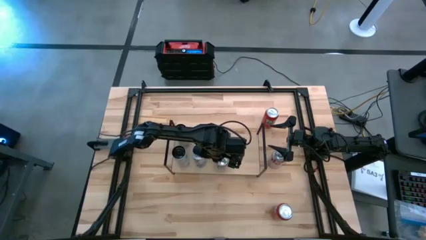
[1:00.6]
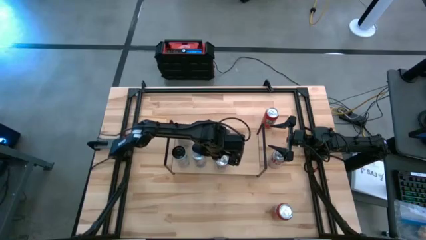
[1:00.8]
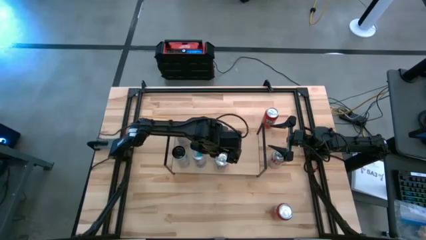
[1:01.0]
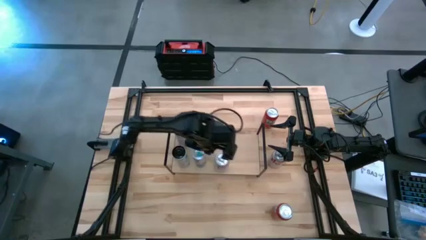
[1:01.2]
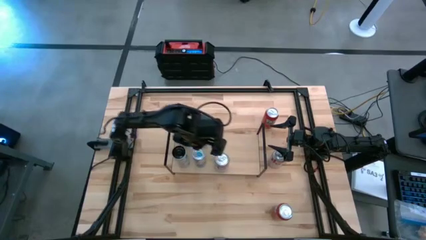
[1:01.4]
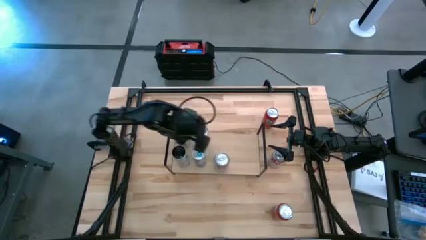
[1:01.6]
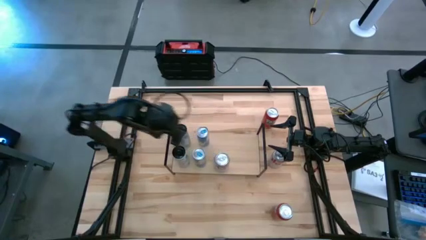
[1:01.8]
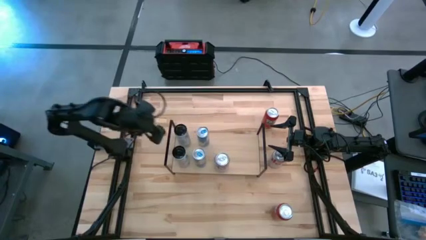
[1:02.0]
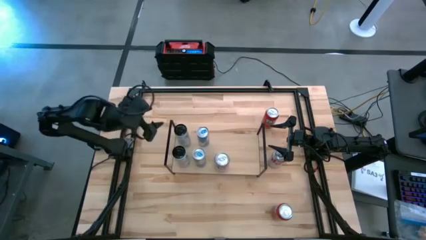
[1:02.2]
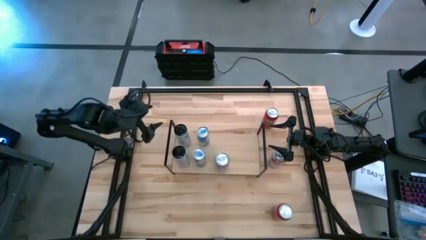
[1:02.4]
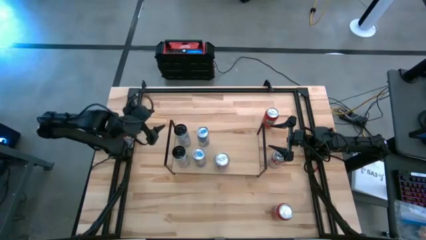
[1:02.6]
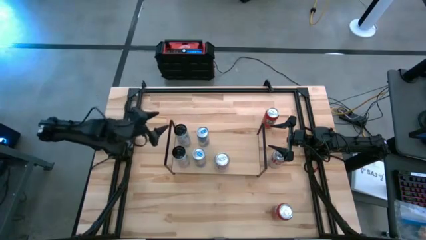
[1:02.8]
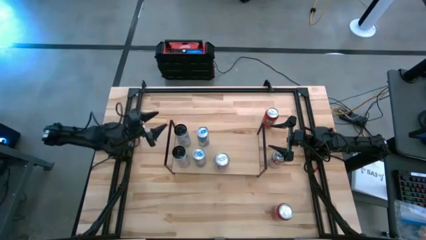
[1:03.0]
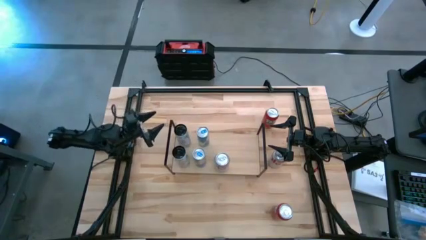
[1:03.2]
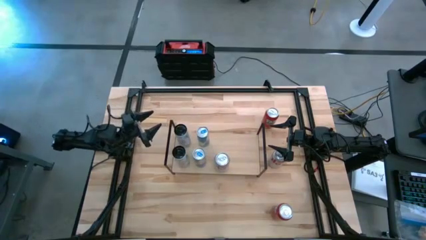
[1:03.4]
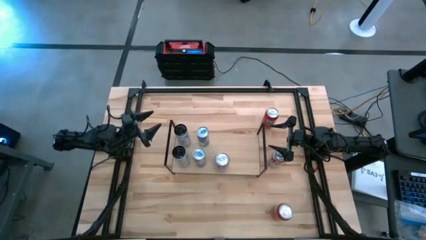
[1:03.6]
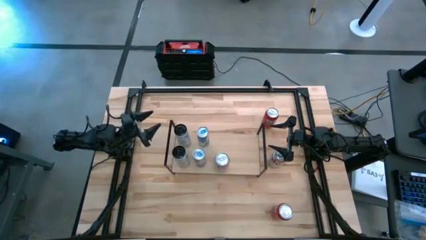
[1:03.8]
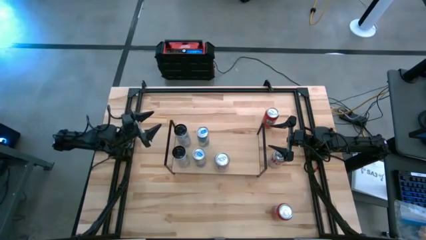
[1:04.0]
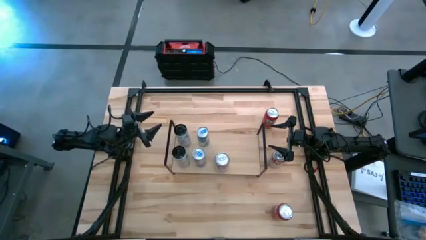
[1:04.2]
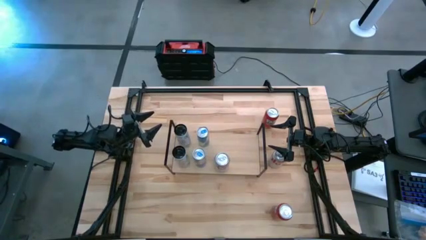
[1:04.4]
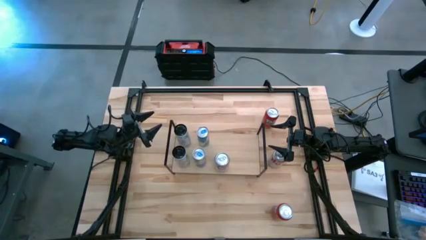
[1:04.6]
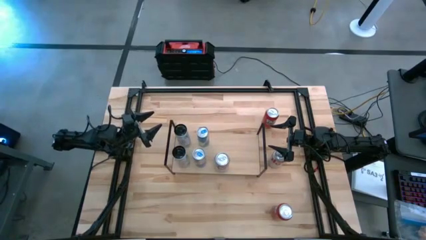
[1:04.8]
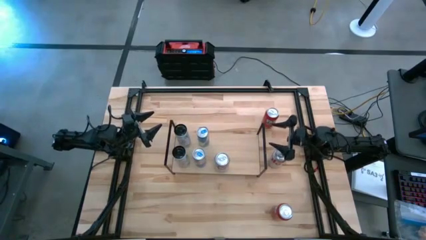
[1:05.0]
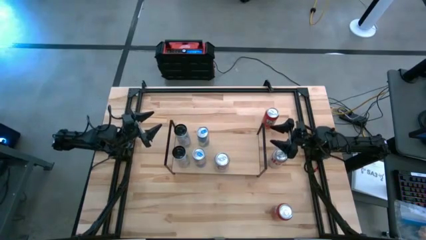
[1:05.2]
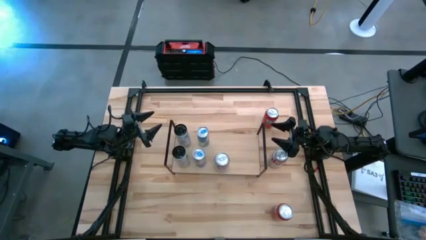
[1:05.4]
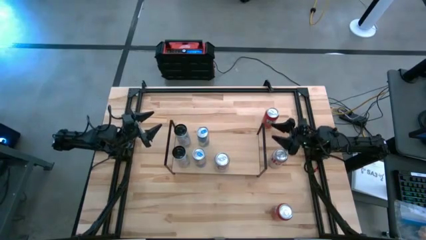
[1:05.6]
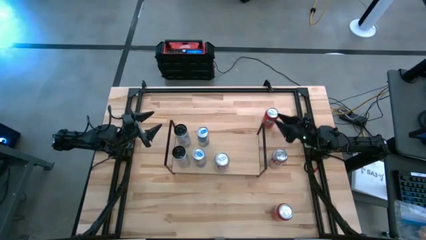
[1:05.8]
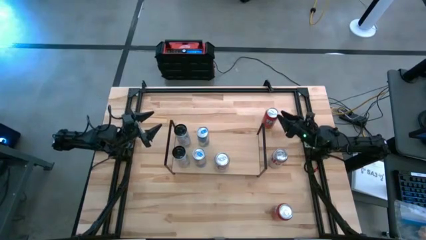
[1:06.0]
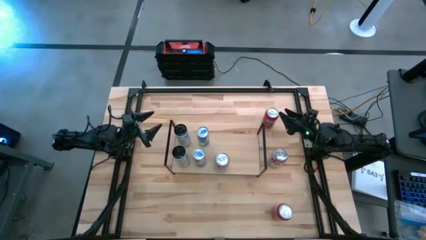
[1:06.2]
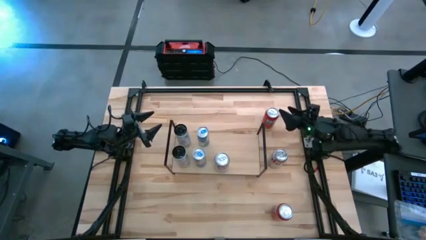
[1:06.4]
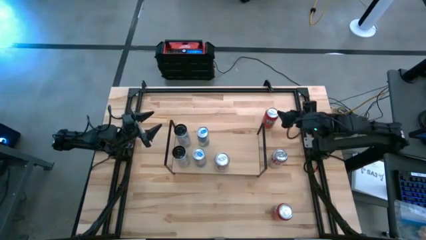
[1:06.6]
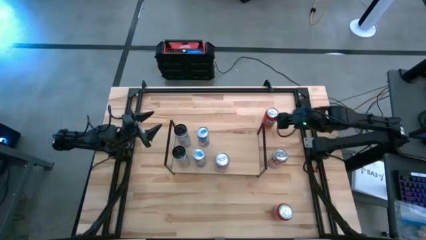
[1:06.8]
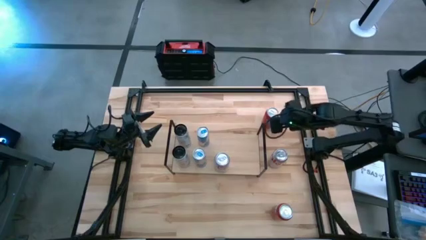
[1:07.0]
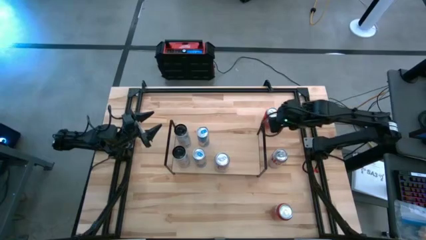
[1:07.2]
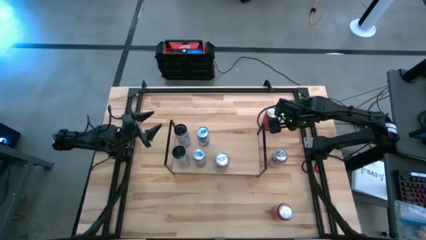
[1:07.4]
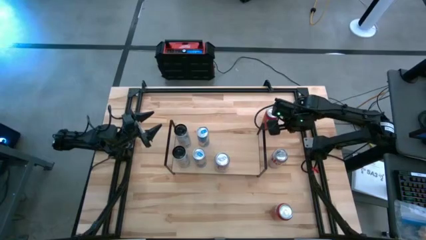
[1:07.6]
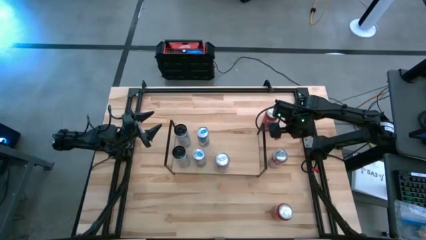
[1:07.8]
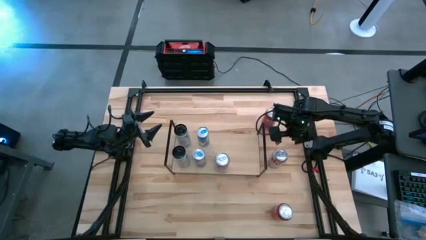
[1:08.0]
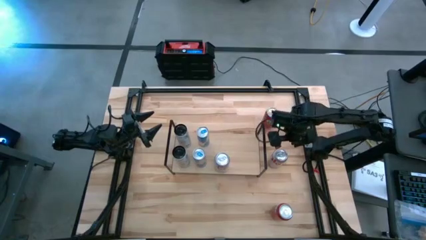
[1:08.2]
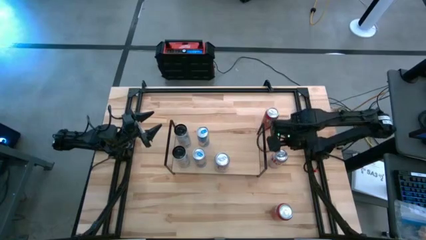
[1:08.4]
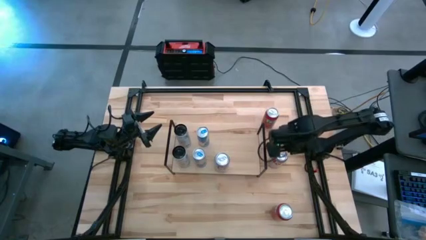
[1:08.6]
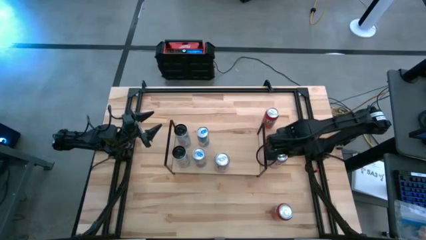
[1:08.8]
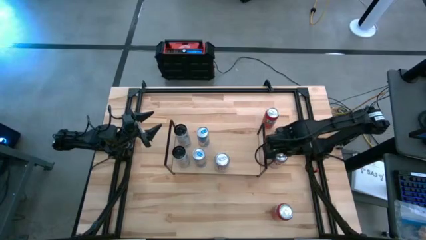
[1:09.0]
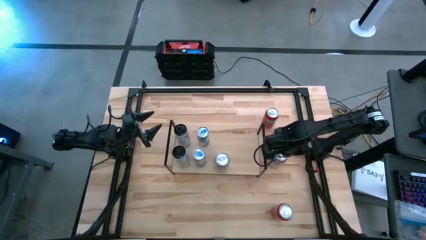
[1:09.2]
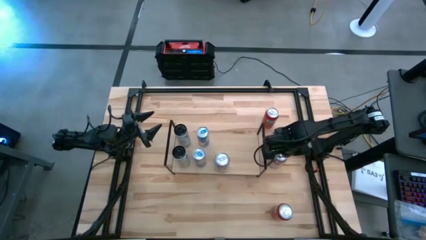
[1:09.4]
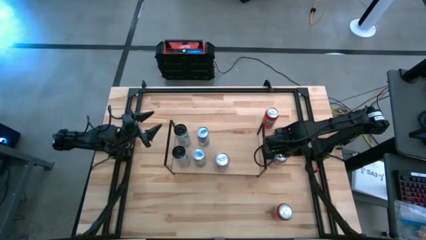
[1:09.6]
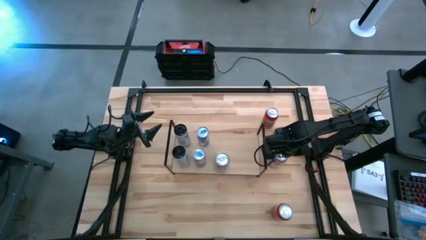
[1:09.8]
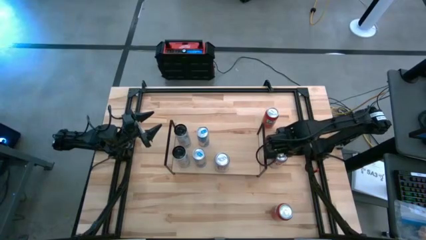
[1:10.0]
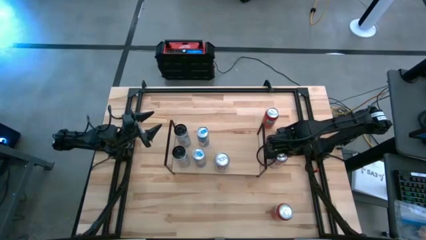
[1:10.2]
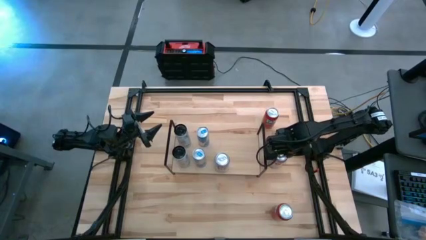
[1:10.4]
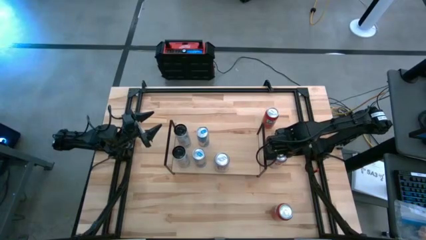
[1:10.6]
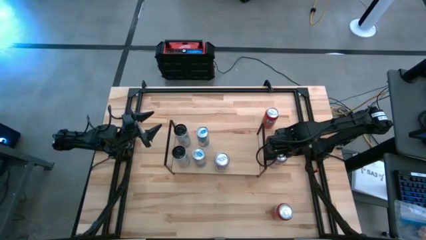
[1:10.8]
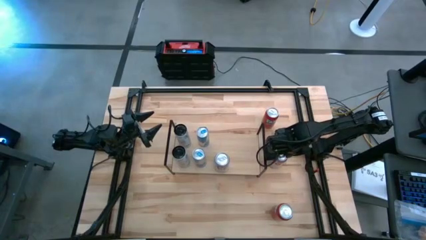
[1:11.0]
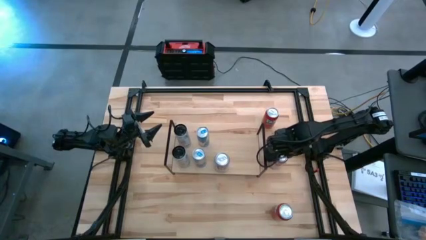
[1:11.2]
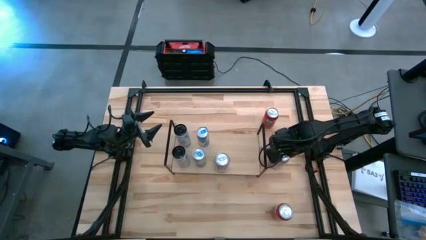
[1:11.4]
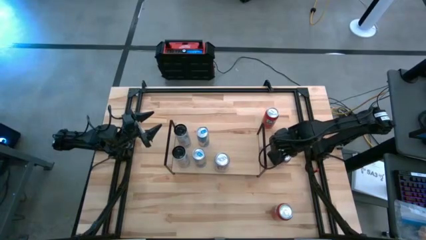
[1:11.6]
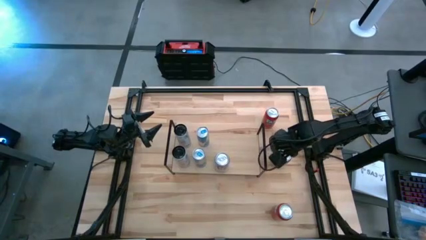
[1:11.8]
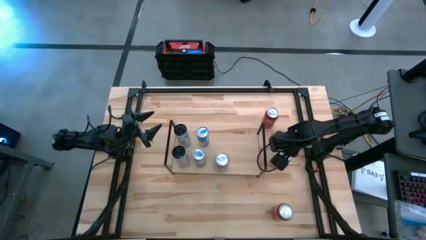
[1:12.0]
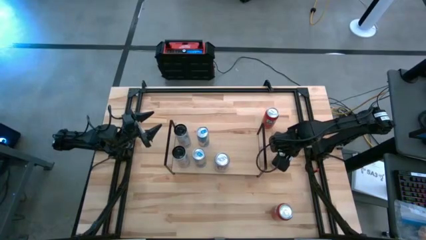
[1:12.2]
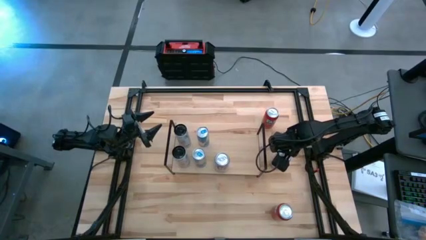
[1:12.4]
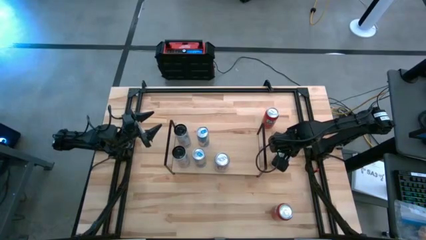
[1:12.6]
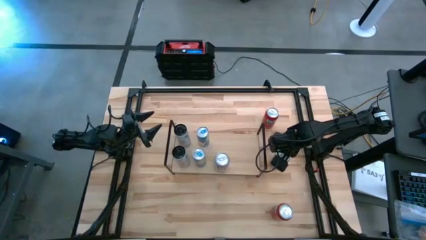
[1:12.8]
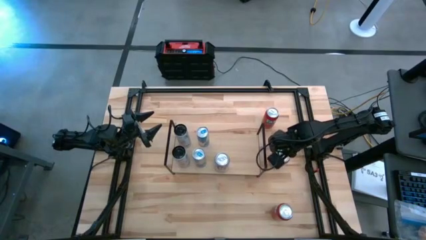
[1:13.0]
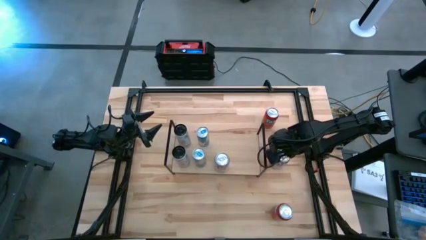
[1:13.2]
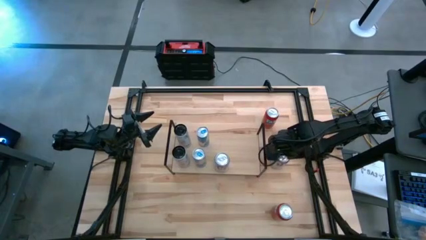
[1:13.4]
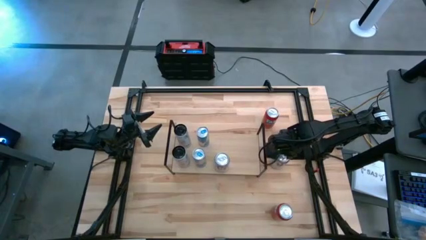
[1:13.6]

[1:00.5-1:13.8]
Task: Place canned beverage on shelf
Put the red-silver soda can on the shelf aligned with the red-silver soda can

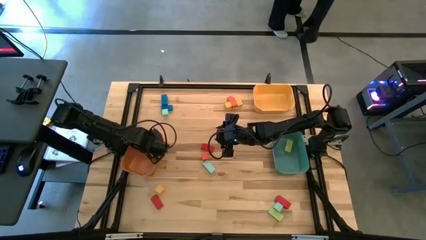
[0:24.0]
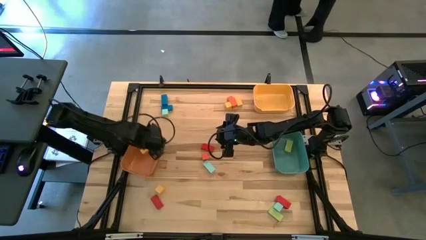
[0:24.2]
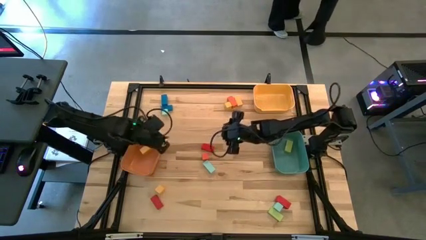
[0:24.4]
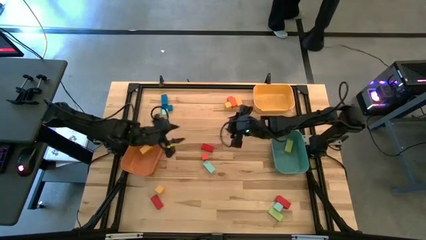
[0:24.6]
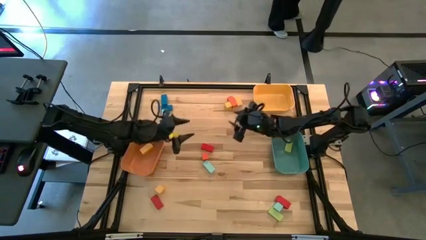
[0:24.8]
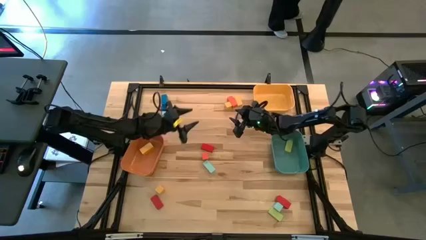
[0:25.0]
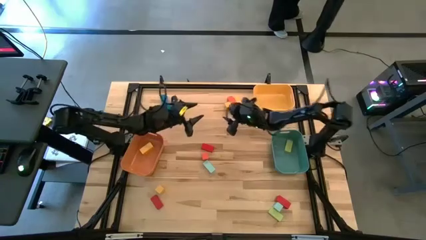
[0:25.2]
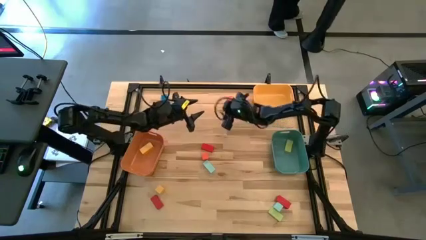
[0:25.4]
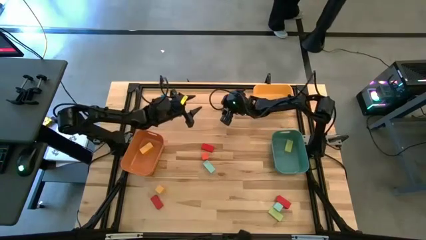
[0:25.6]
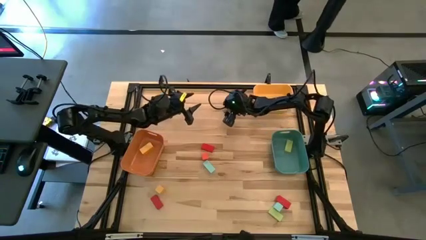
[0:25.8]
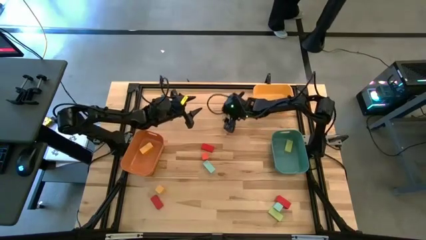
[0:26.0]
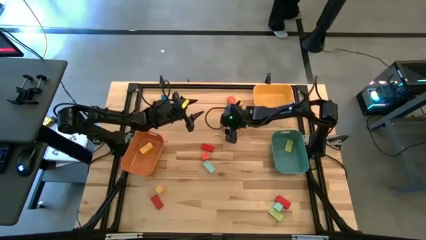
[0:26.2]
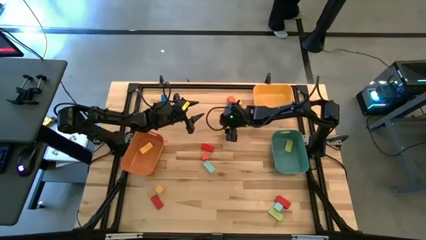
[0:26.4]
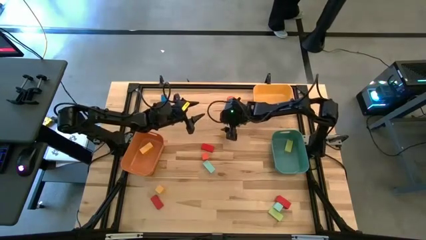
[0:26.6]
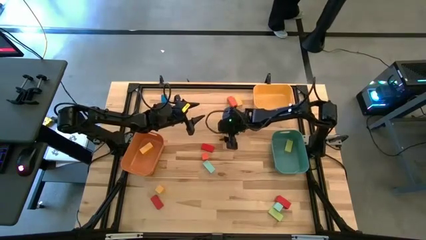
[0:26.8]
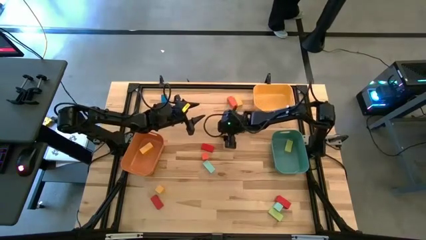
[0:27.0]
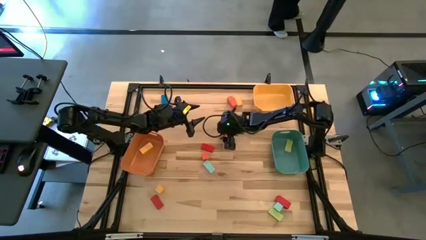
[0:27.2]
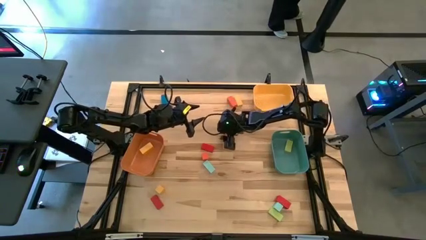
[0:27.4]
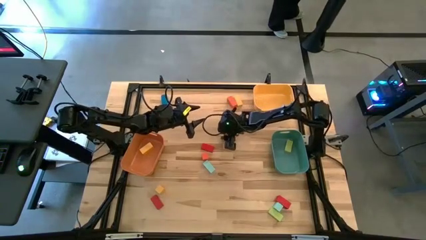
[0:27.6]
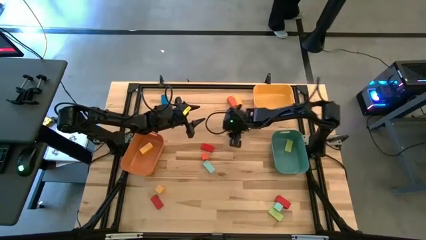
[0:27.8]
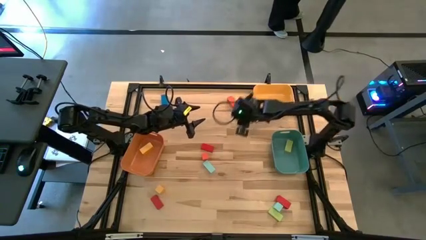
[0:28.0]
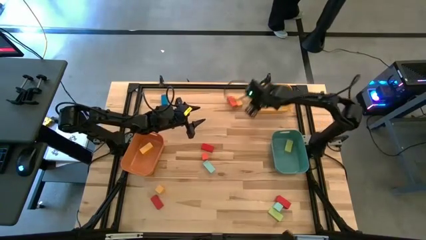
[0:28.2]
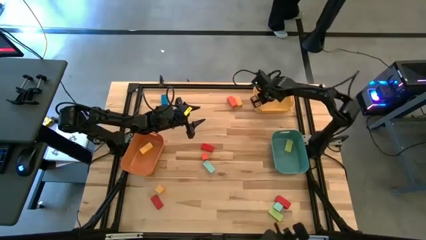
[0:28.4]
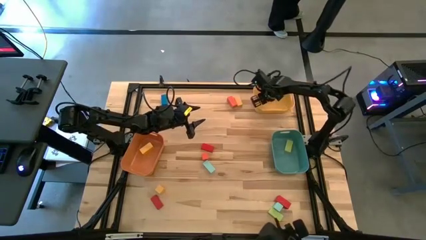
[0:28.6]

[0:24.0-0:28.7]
Task: Sort blocks by size
Put the top yellow cube block into the yellow bin
